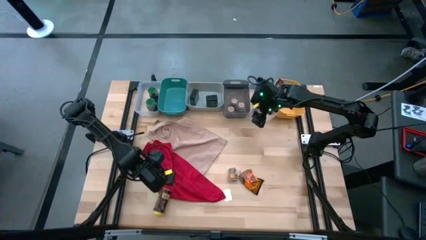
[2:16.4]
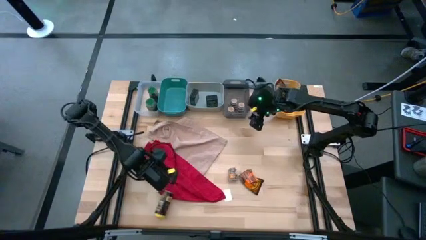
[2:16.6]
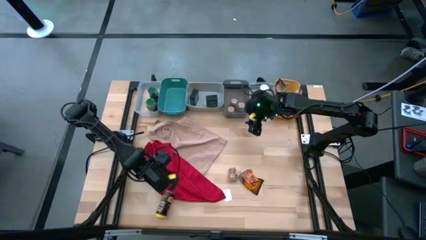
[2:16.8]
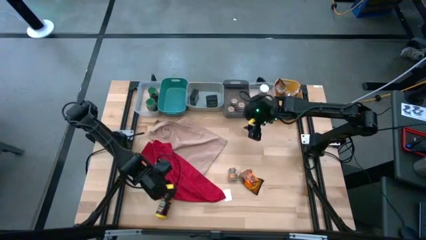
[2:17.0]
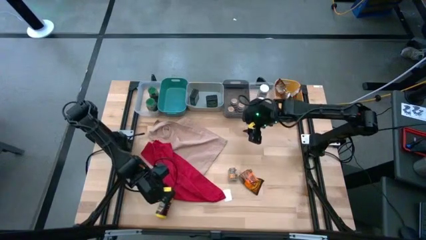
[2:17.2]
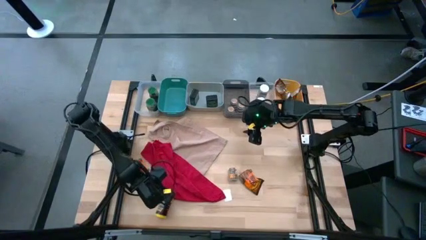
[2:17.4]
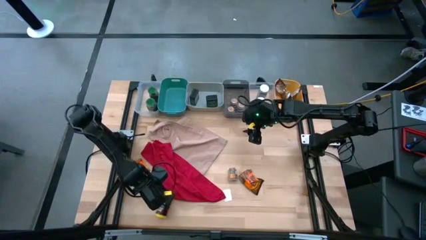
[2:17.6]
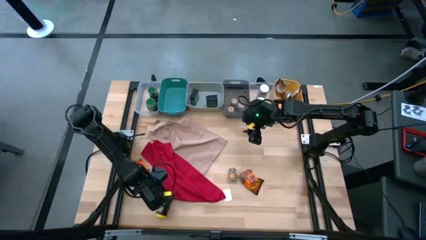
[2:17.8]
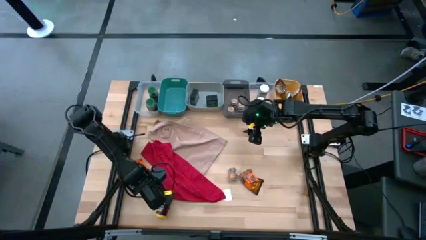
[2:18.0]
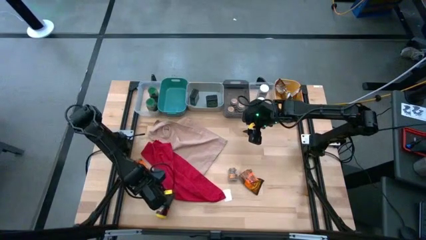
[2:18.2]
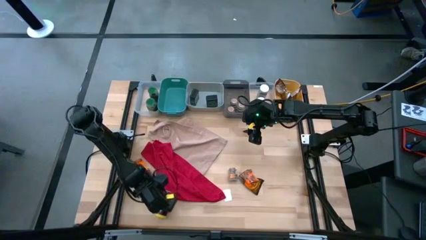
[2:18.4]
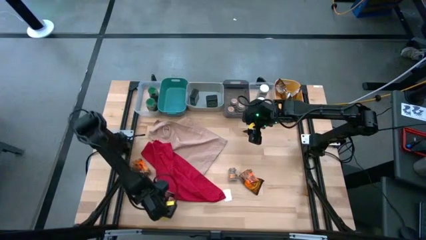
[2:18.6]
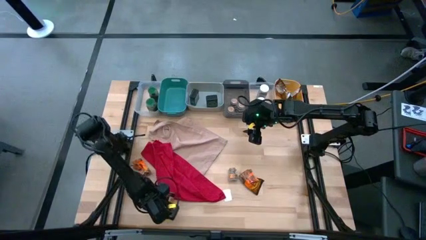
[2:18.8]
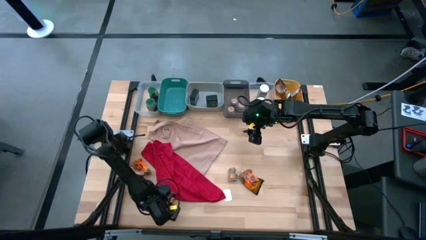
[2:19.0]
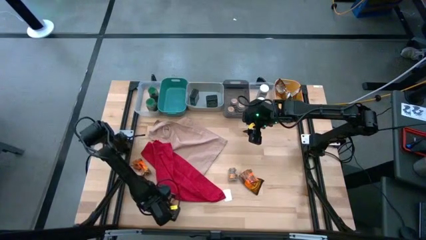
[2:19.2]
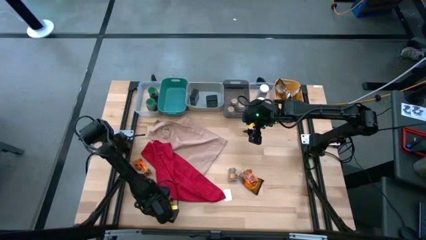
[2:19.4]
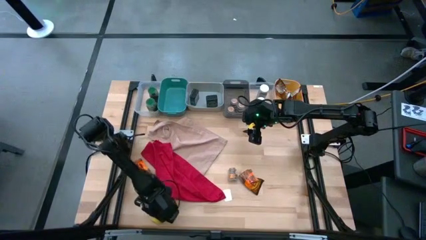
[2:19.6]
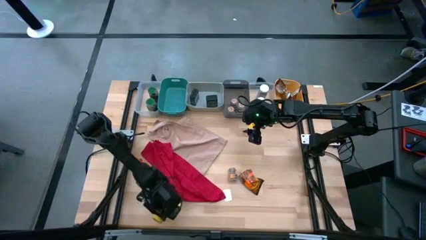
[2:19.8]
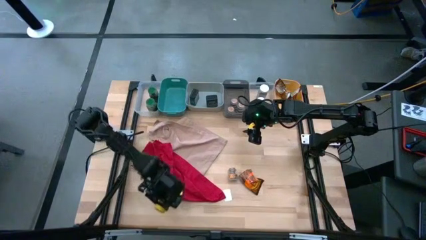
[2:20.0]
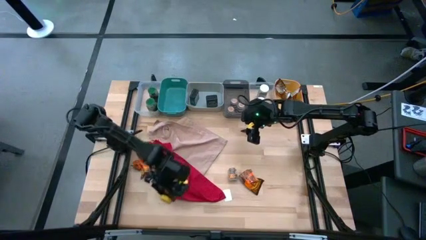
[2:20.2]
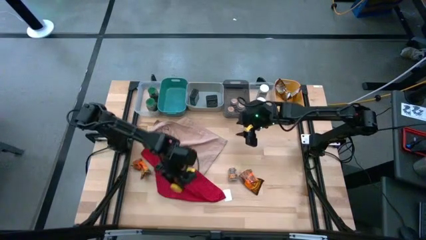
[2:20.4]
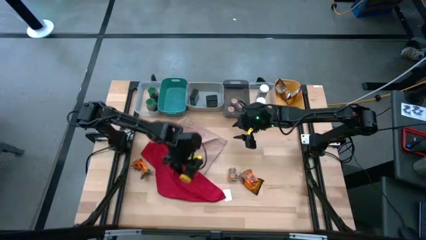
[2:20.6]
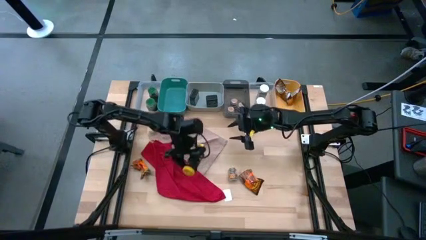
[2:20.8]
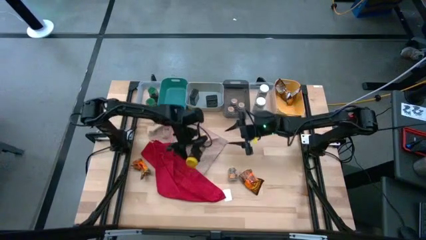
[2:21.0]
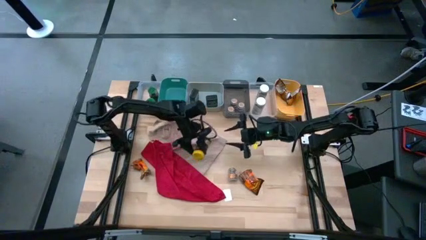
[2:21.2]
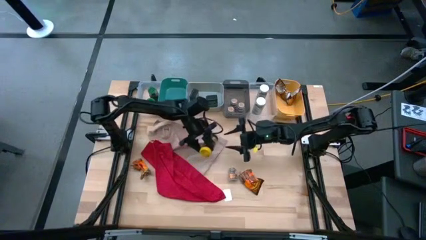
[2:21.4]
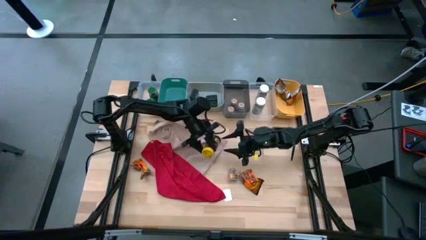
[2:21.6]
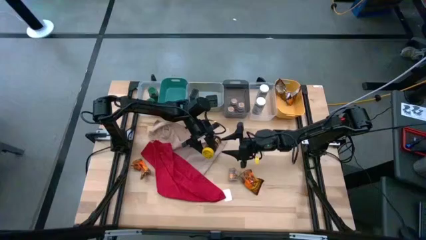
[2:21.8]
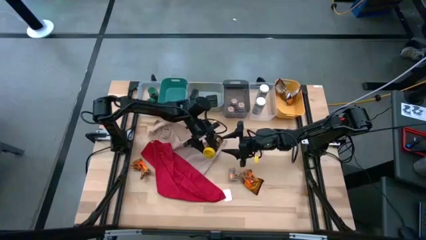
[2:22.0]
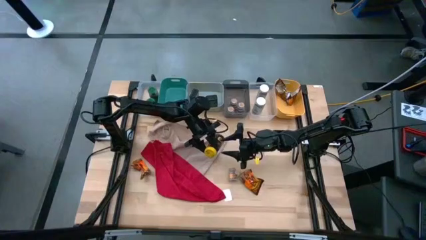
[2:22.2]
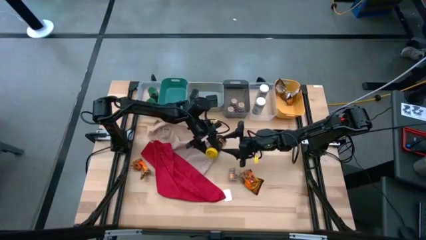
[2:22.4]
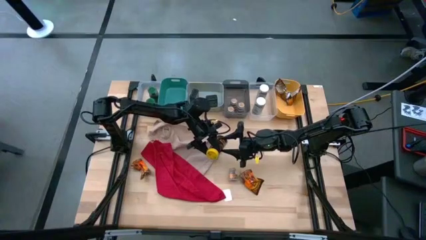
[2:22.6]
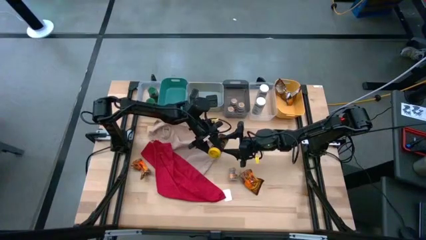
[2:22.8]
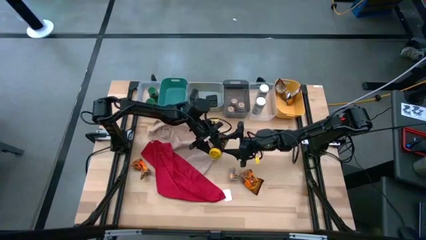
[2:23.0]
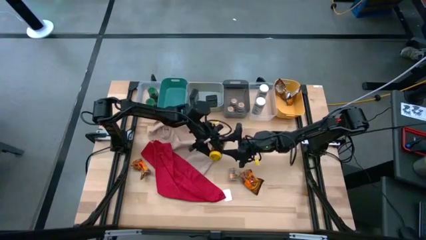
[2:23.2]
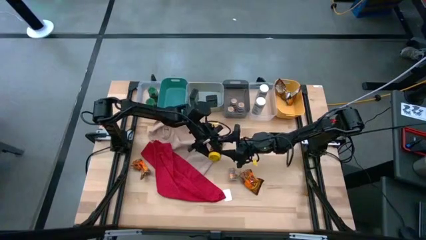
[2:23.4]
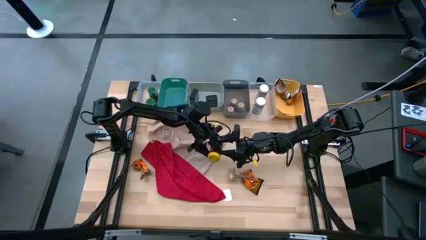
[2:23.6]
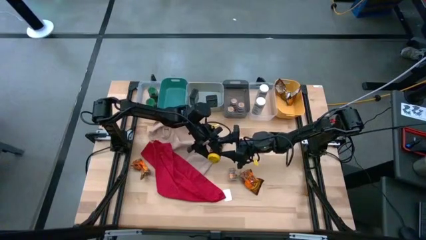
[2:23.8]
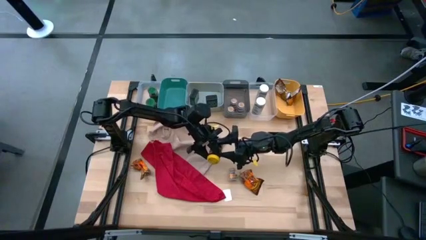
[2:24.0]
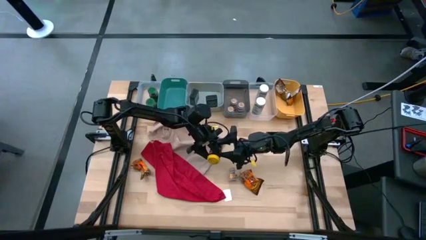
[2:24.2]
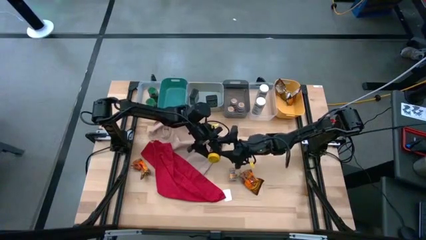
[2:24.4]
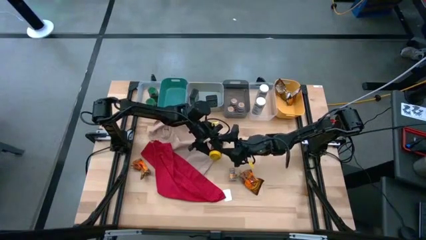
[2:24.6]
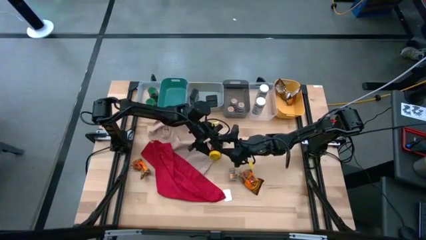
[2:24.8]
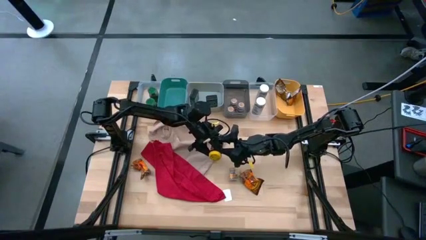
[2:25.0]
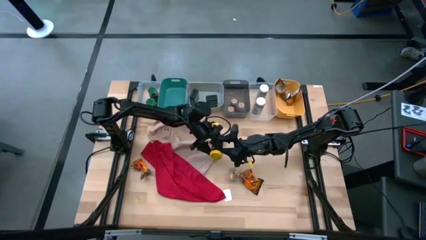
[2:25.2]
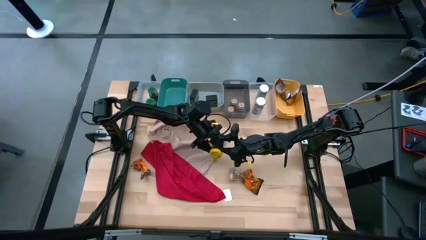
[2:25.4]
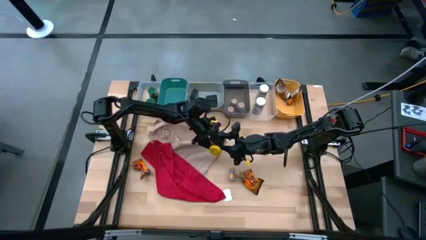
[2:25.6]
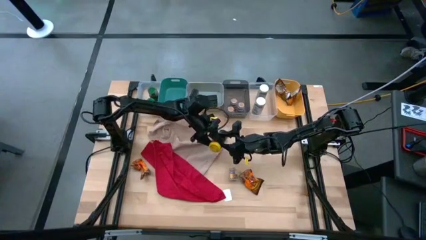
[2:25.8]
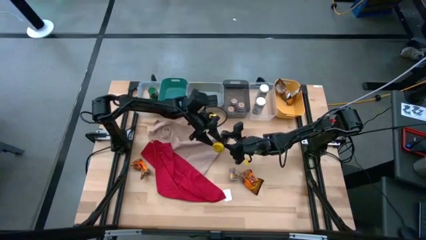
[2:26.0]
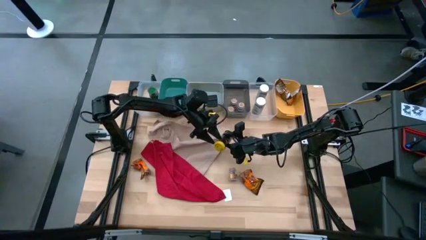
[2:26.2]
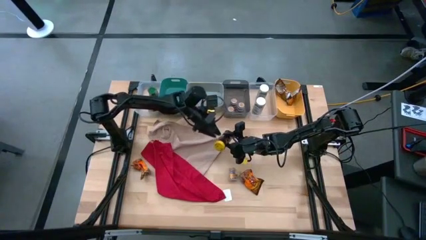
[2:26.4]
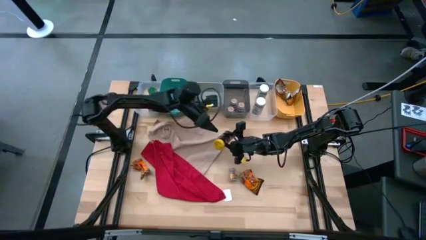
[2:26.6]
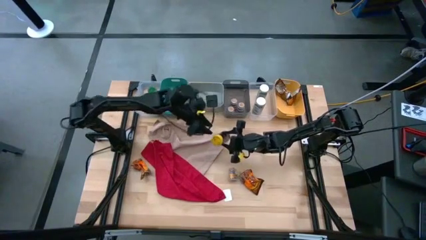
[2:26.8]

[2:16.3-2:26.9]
Task: Sort spices by type
Put the yellow seasoning bottle into the green bin

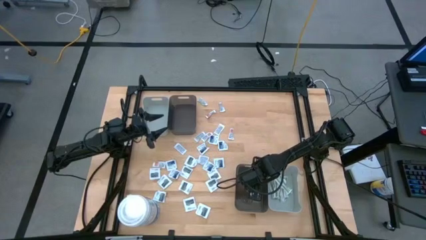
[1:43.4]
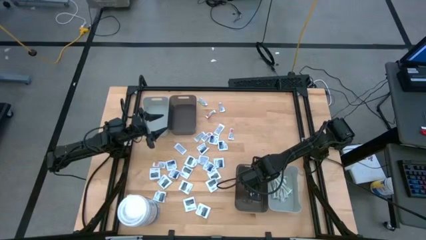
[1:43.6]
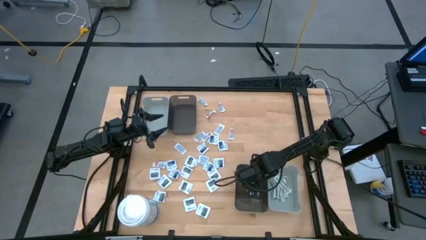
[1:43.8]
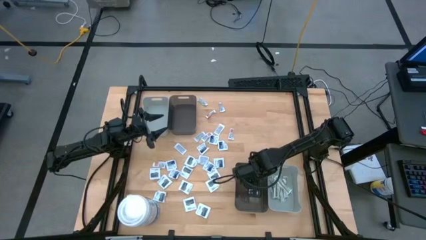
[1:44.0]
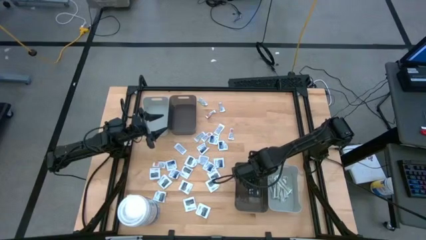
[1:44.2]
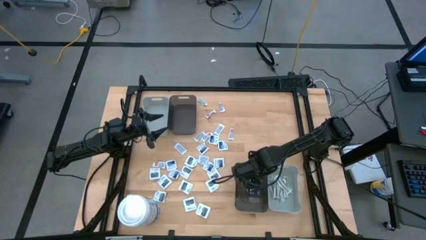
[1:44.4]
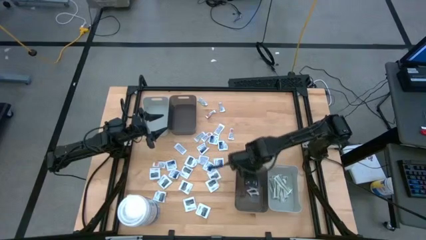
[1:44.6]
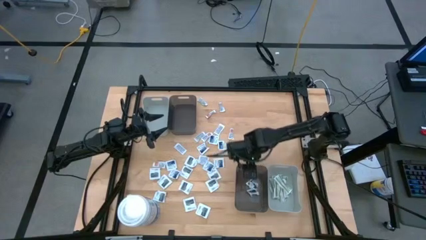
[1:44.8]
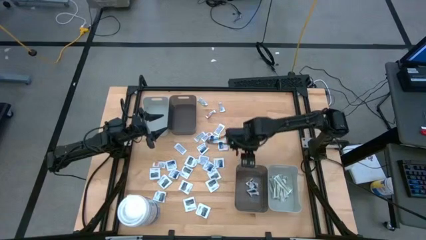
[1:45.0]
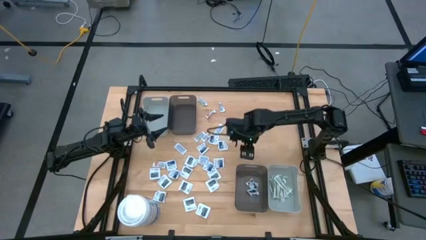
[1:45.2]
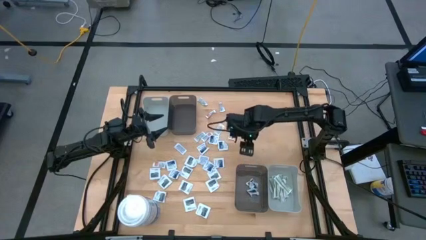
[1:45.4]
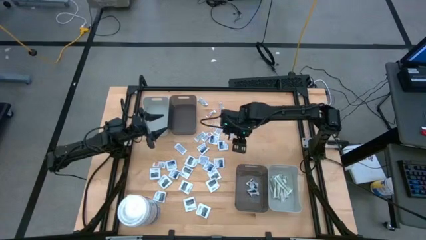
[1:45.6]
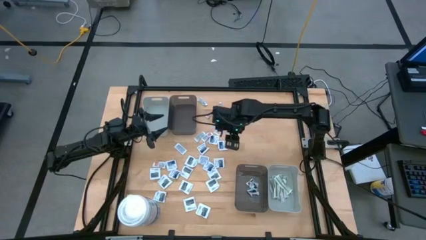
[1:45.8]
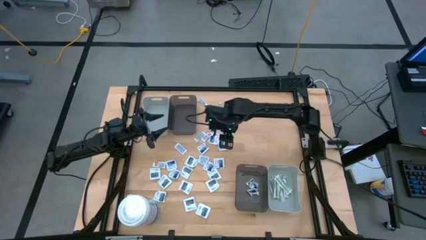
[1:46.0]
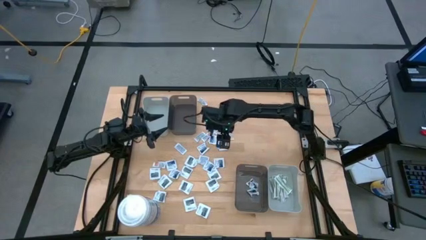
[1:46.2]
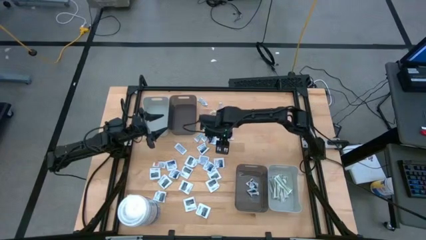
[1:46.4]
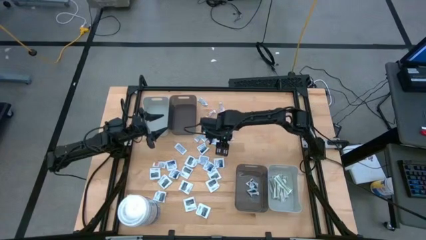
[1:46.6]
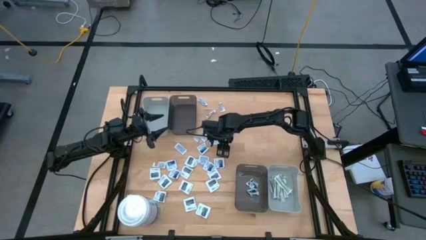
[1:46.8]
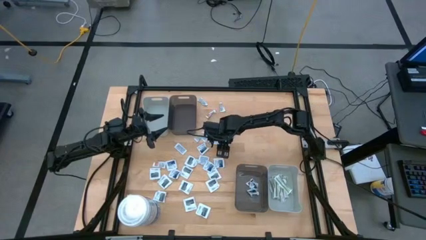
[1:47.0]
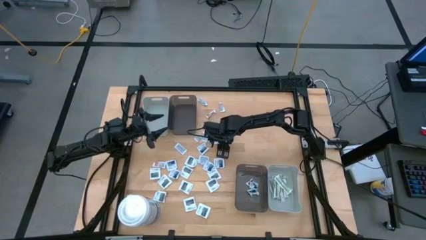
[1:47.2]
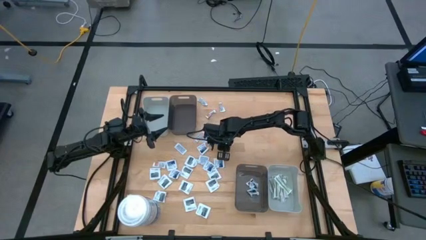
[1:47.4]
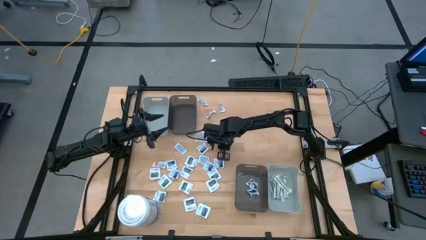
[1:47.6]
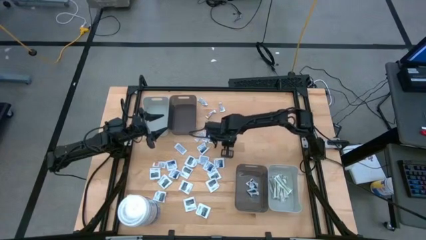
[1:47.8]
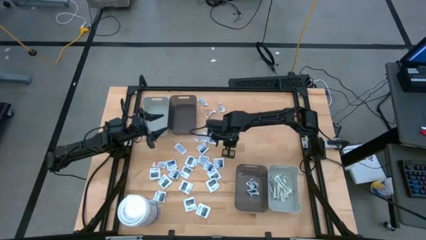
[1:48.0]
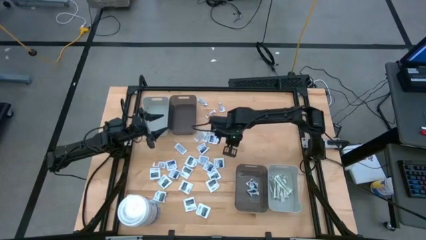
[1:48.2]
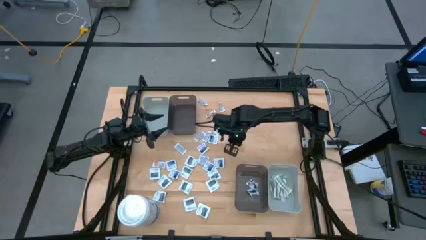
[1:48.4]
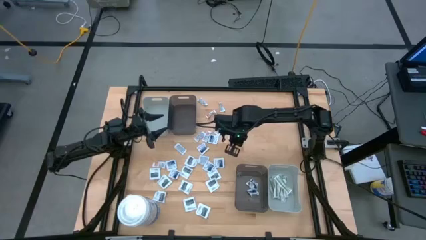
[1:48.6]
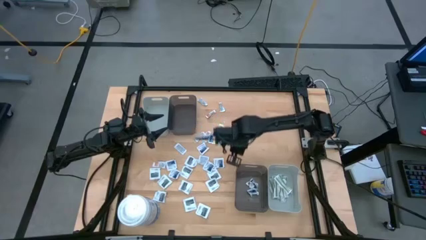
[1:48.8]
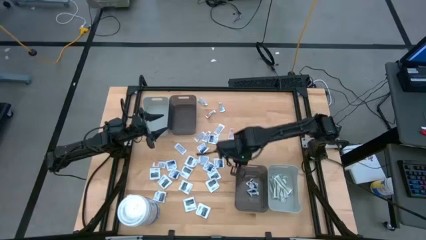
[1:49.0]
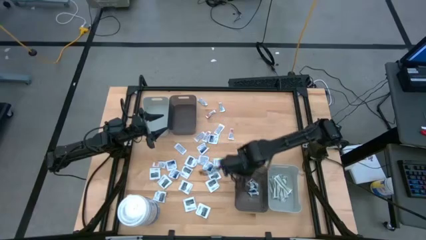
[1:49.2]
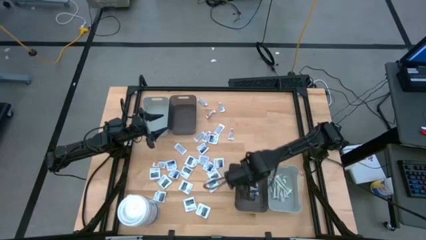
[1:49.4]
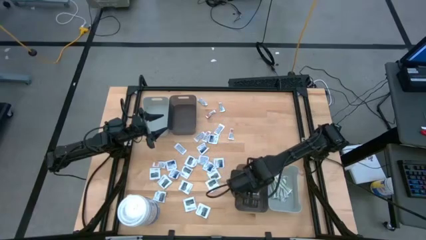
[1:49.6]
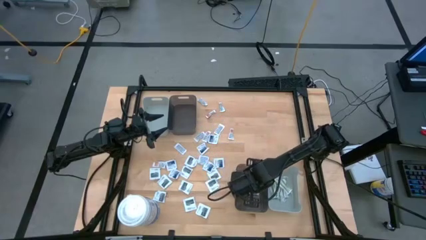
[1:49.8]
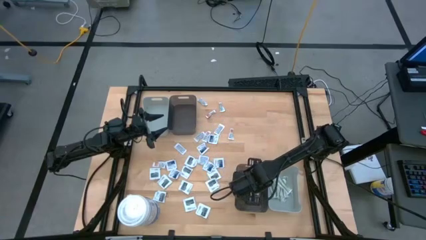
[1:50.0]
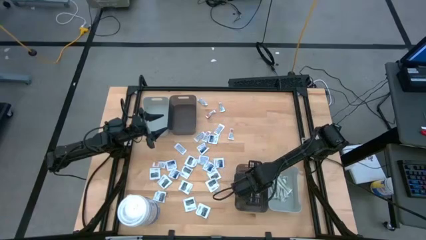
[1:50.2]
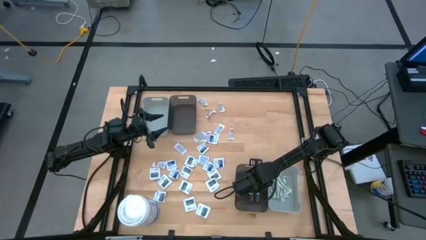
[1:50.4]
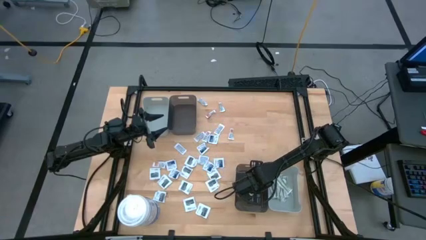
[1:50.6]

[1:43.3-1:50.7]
Task: Pick & Place First Aid Supplies
Put the white alcohol pad into the bottom black bin
